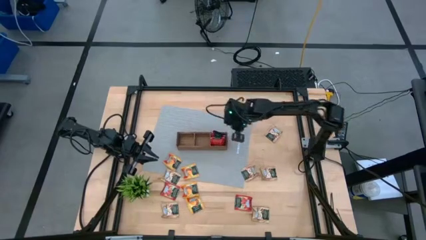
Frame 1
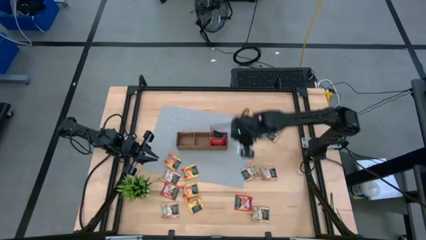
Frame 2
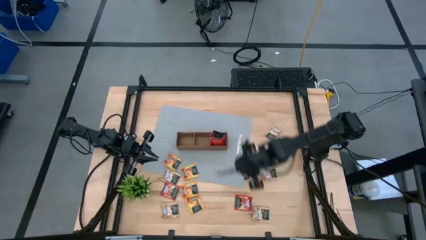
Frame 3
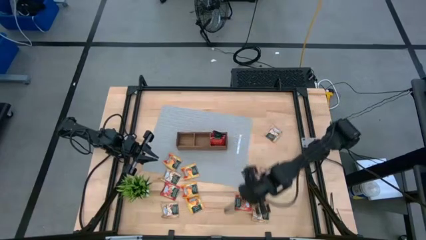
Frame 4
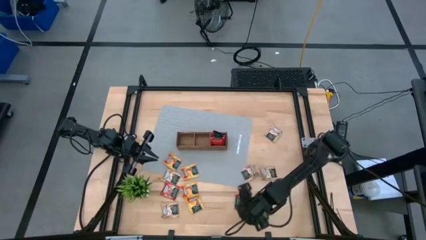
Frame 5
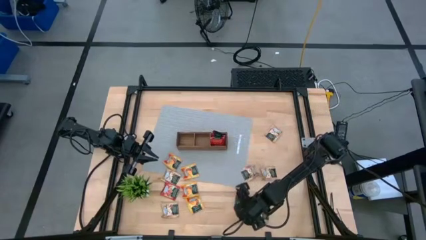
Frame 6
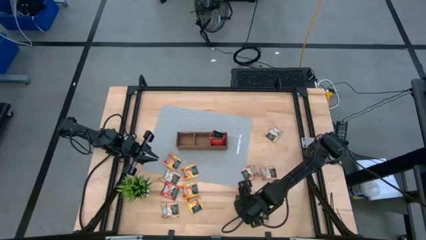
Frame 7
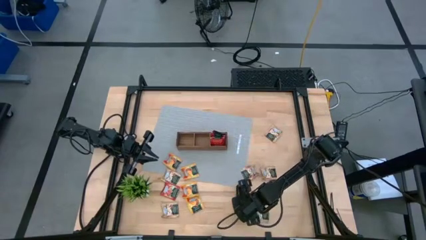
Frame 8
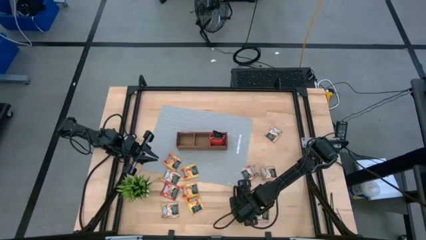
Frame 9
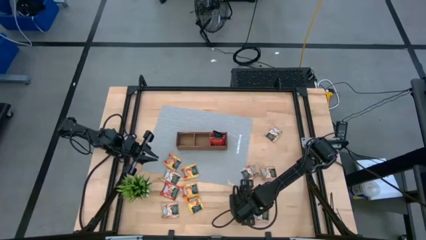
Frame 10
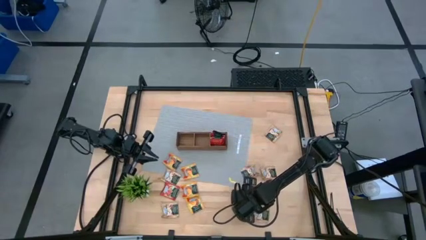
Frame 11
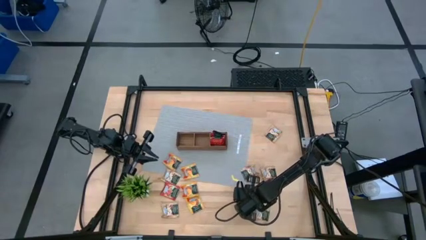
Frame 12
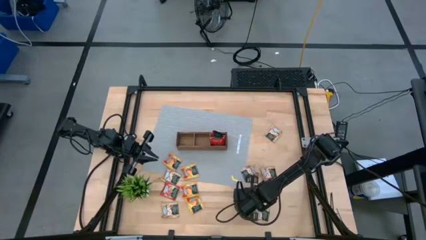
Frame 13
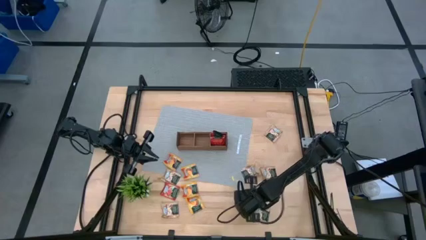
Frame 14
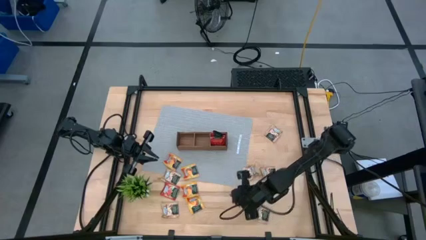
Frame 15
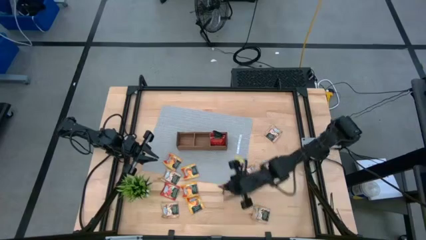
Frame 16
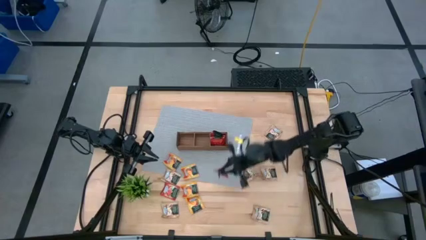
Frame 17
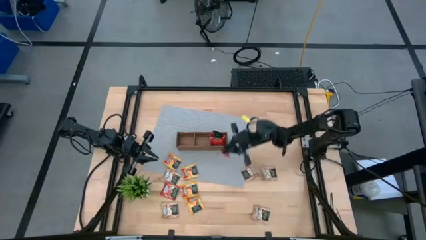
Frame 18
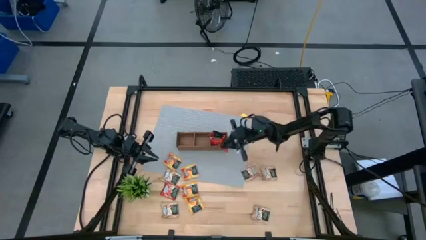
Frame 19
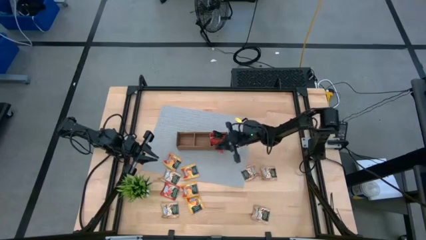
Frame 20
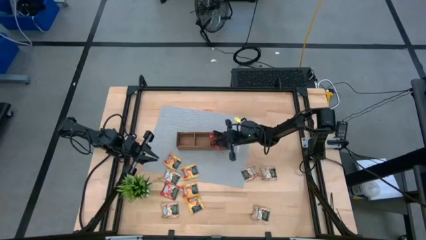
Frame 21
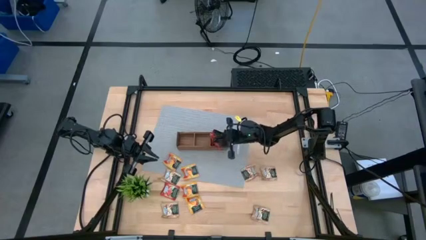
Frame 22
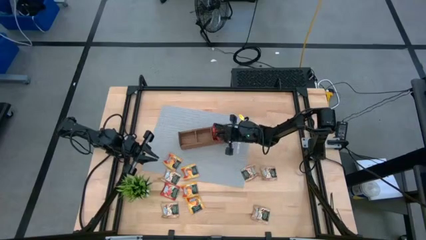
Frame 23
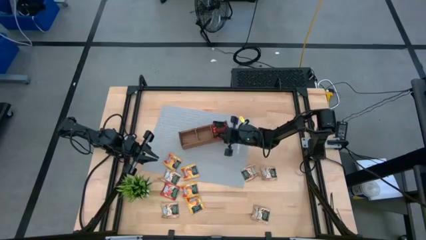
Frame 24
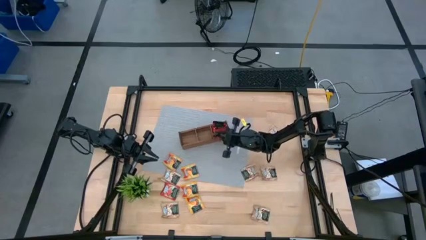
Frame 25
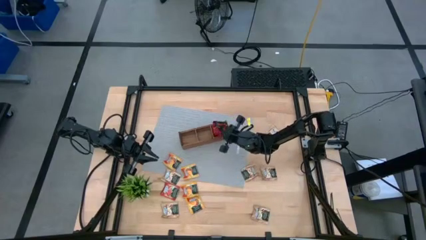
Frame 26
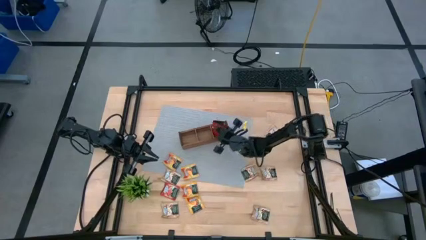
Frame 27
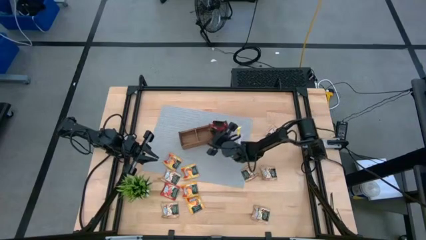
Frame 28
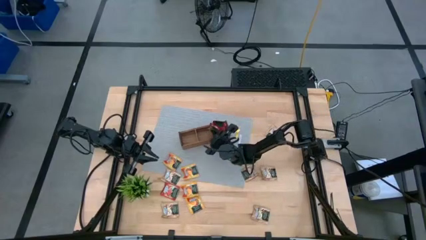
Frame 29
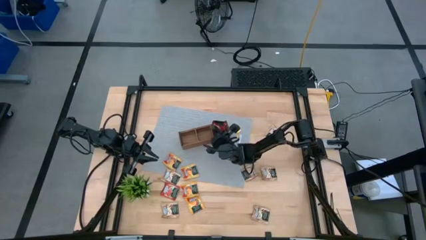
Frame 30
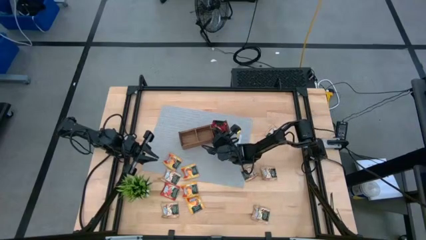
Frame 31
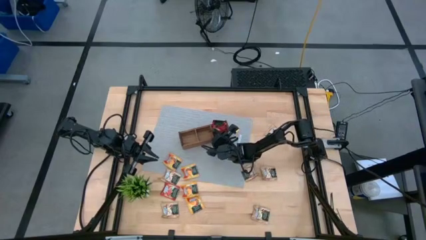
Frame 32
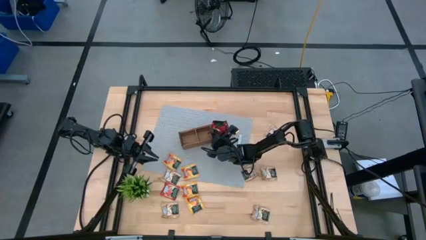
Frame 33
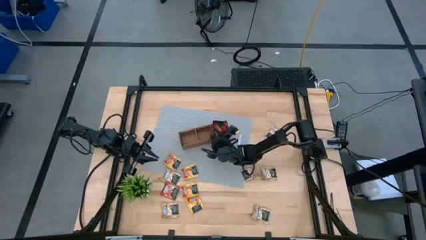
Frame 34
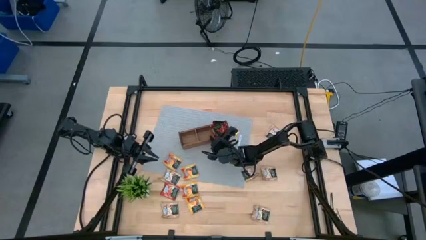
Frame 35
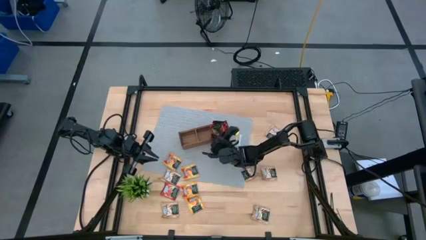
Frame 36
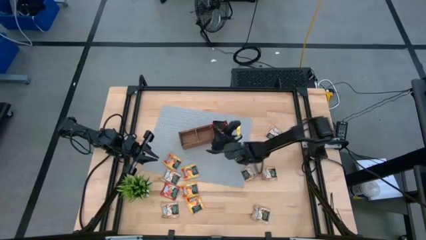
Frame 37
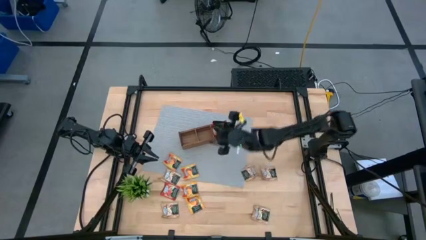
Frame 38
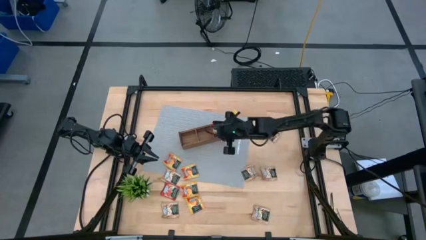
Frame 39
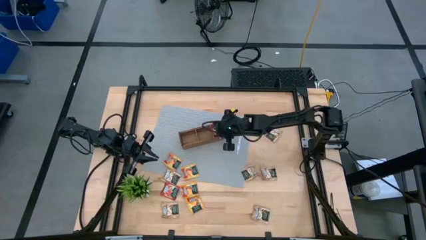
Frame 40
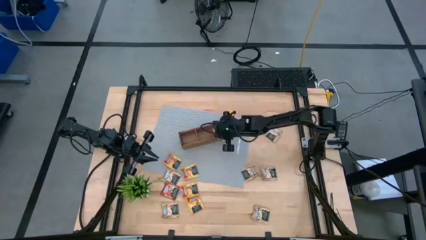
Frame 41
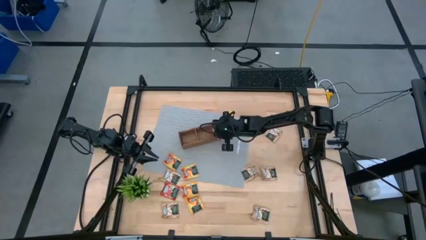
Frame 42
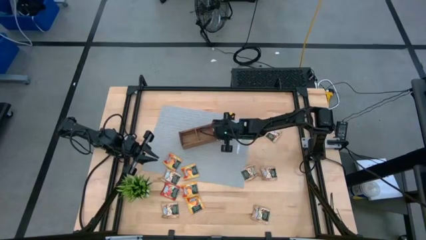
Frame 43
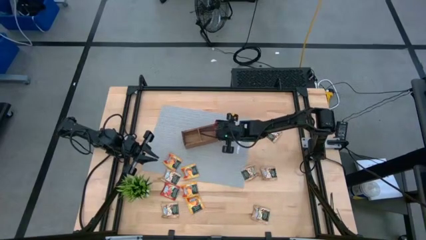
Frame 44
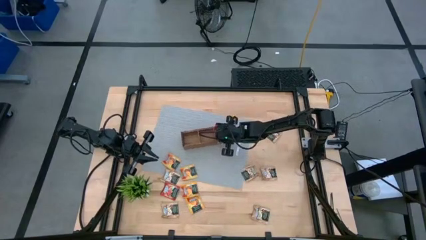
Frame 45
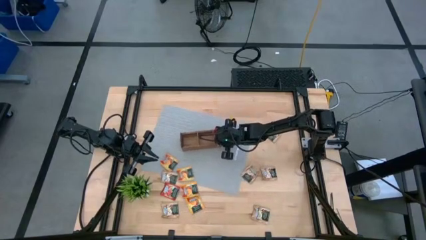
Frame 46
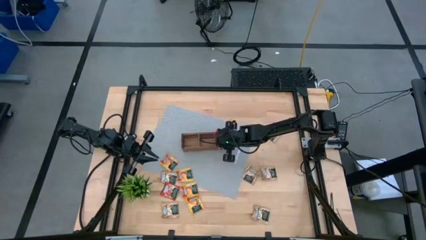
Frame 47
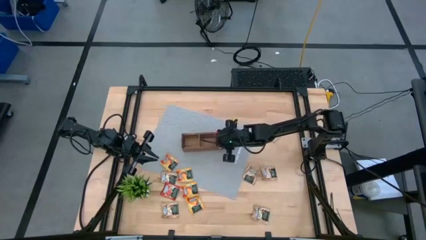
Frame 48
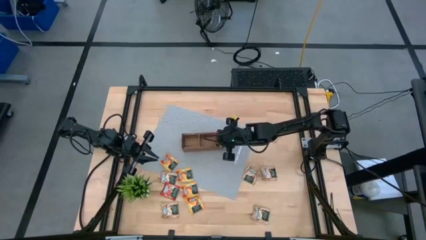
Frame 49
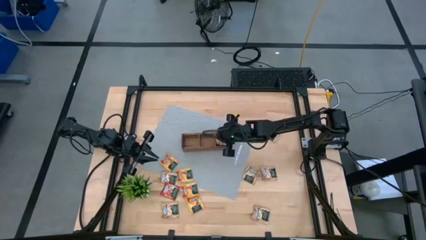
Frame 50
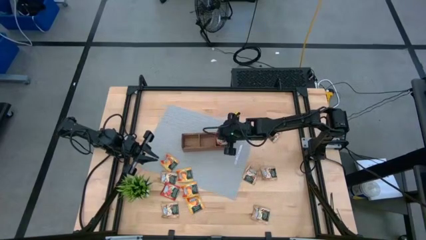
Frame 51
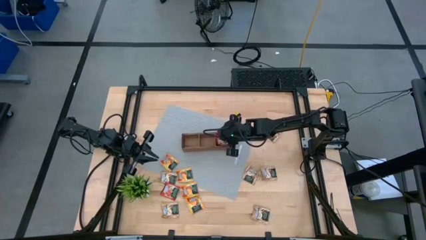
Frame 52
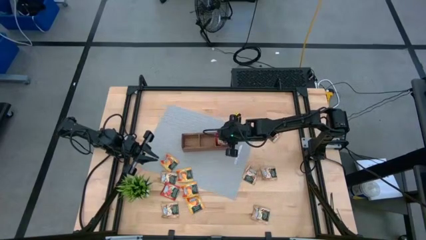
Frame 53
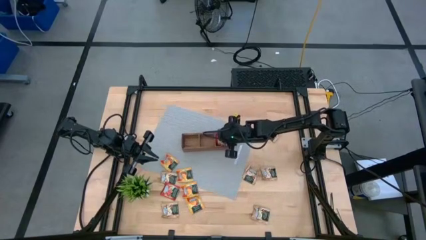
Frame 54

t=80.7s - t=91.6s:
Task: Pick & Place Tea
Put the red tea bag into the wooden organizer

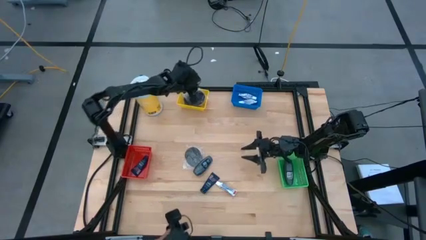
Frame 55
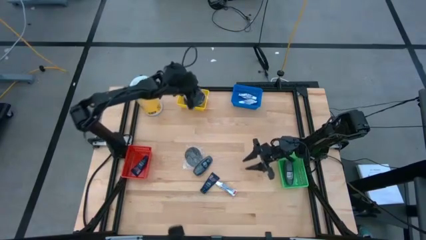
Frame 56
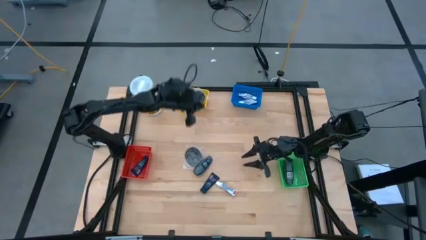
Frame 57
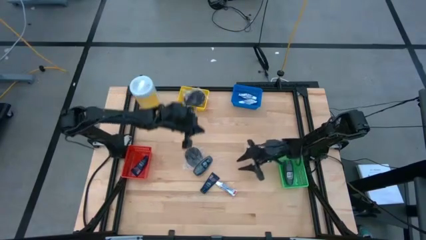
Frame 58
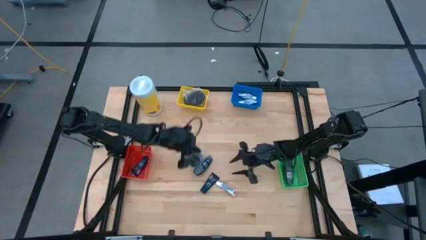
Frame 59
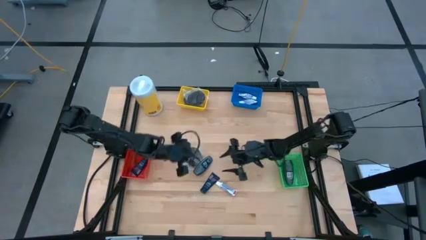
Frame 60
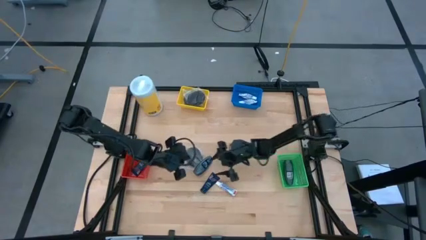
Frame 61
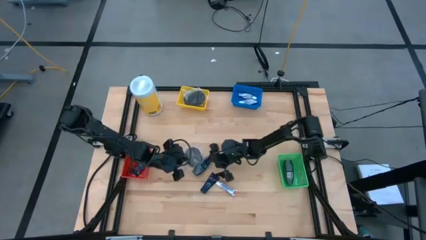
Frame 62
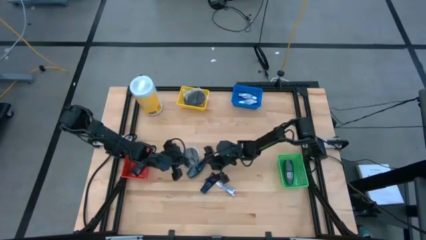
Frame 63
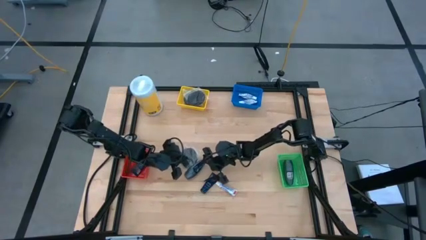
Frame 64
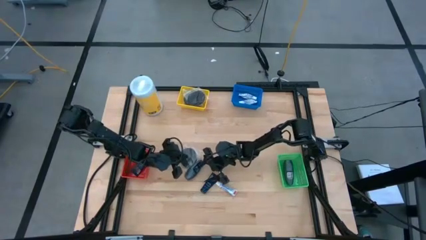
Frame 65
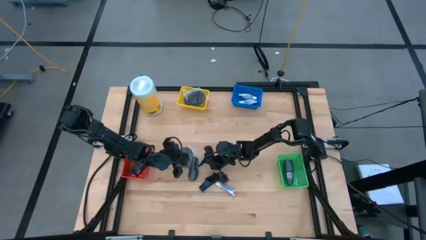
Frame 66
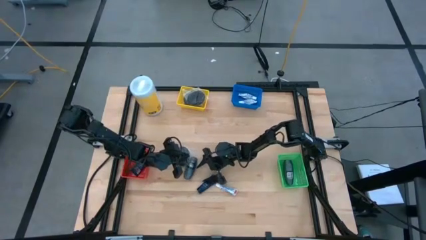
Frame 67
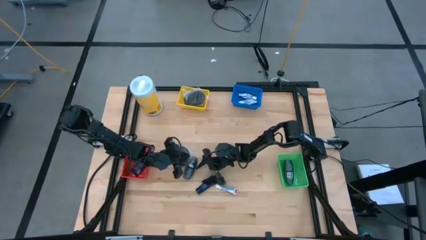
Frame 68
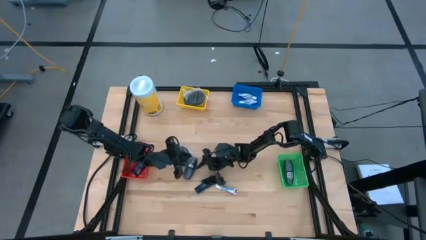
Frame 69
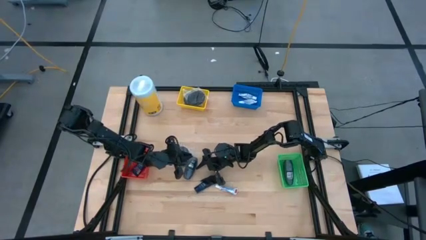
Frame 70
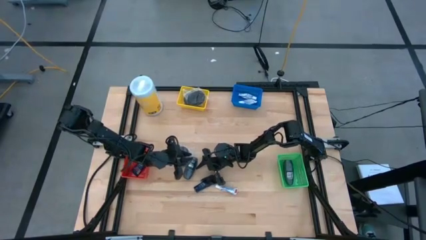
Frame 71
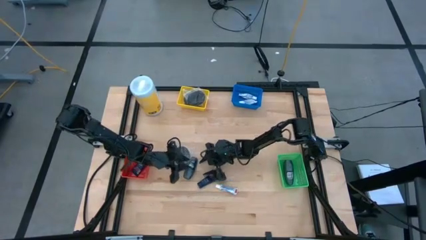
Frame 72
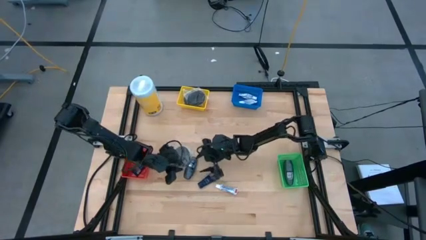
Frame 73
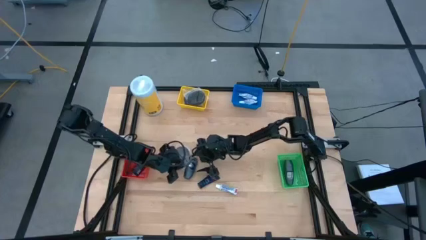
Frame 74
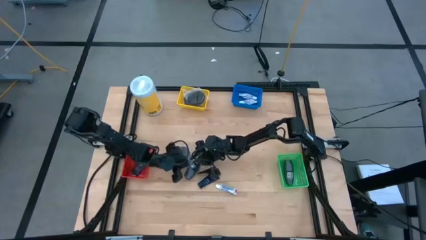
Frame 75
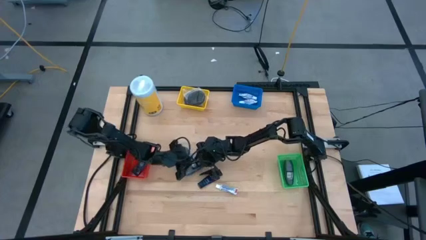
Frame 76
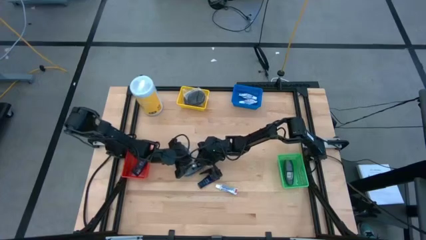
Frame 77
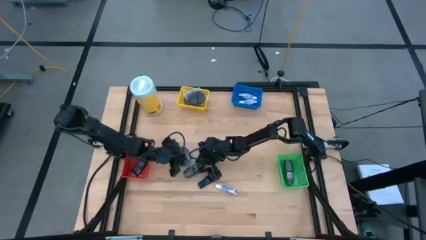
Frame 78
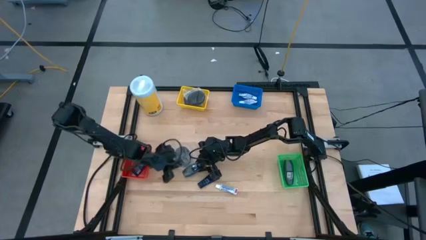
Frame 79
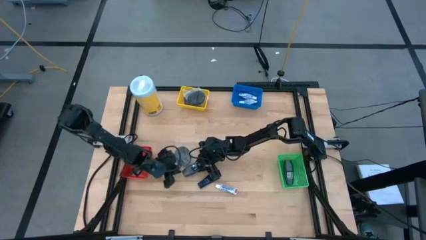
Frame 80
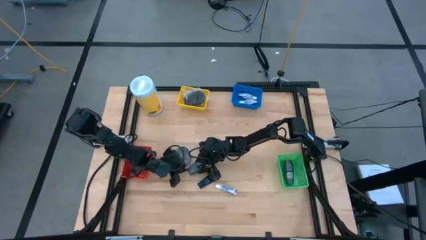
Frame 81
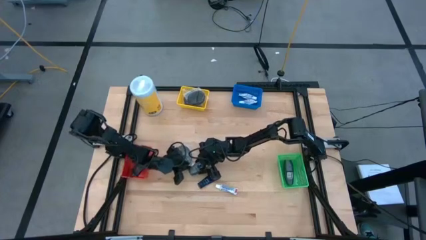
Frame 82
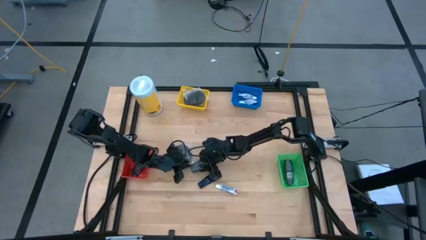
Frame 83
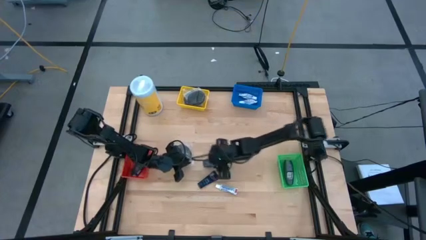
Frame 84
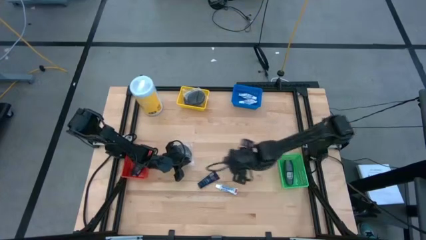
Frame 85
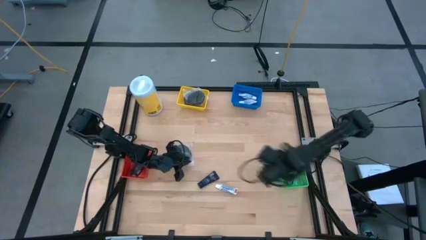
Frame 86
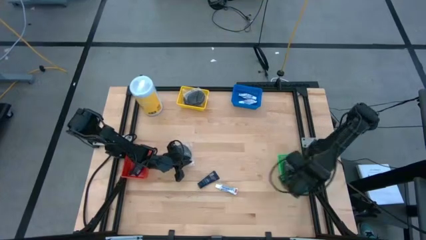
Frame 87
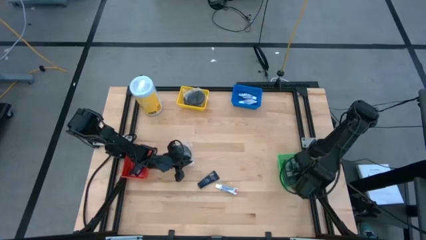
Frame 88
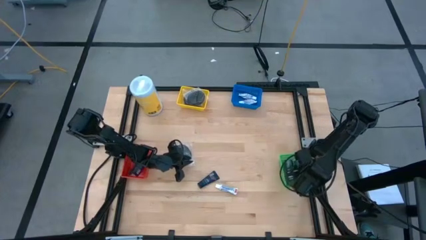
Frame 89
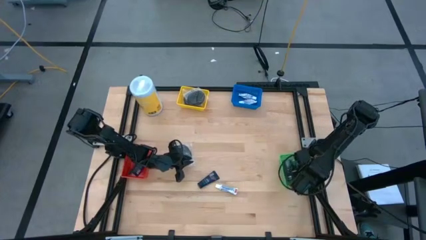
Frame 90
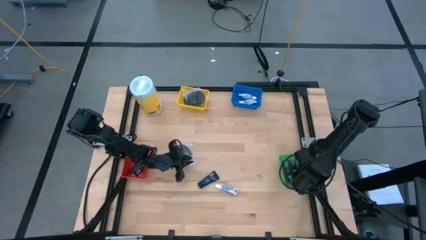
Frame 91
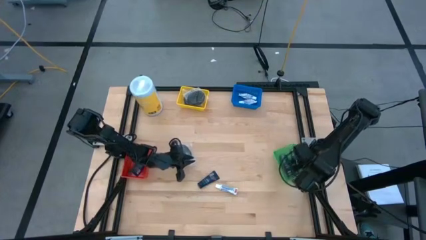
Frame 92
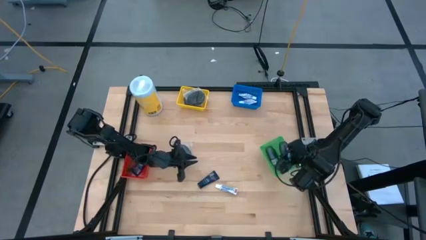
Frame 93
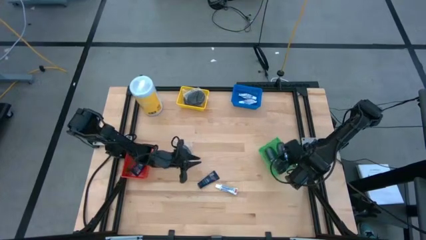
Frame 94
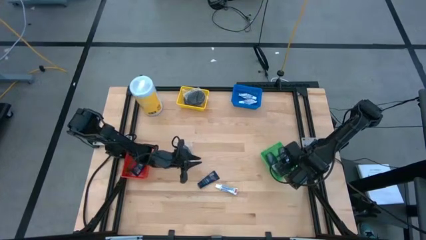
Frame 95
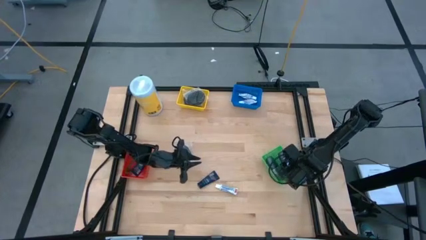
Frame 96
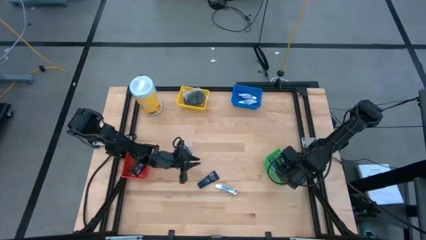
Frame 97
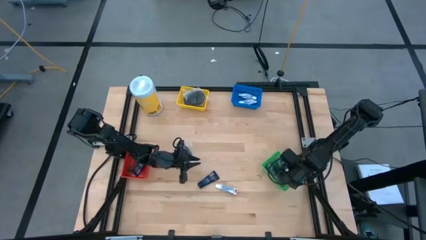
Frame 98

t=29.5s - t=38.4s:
Task: Pick & Place Travel size toiletries
Put the gray deodorant into the green bin
